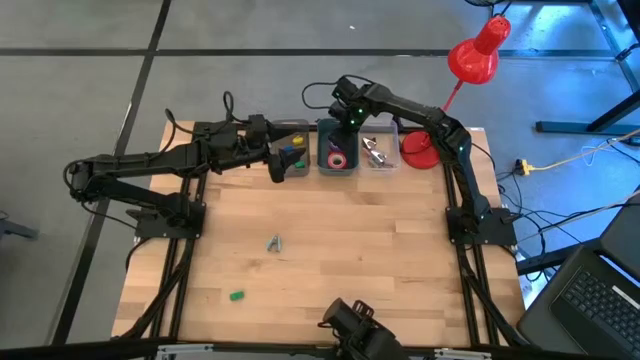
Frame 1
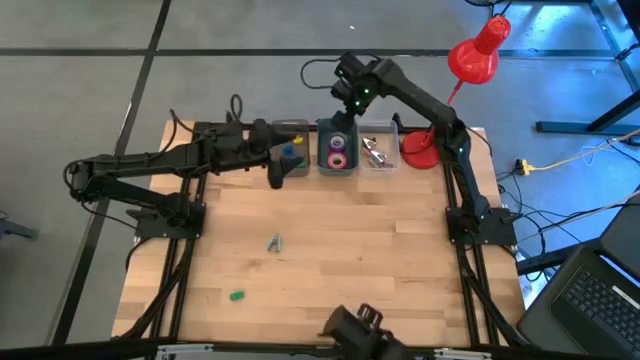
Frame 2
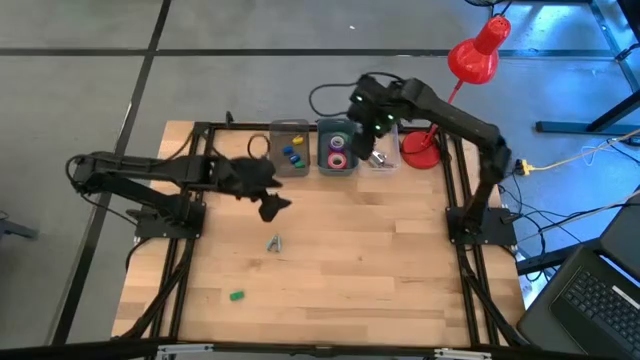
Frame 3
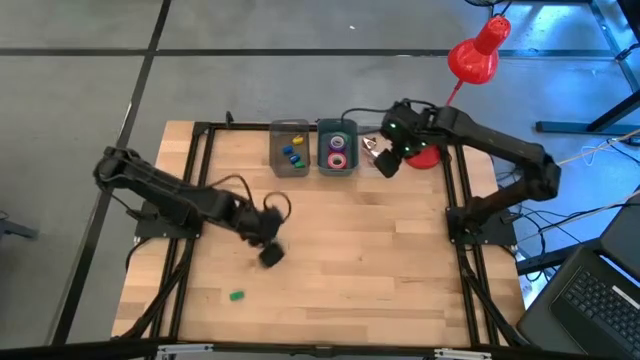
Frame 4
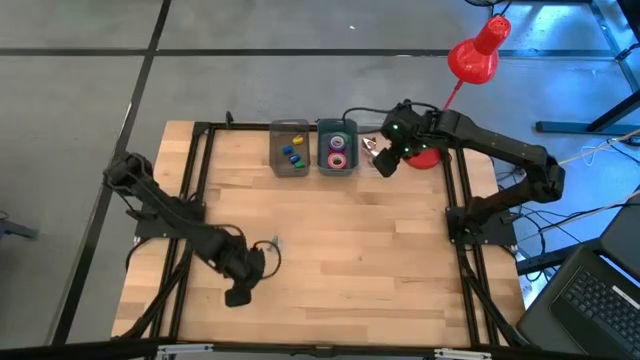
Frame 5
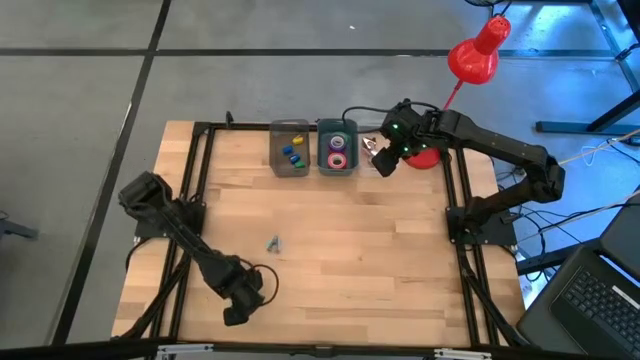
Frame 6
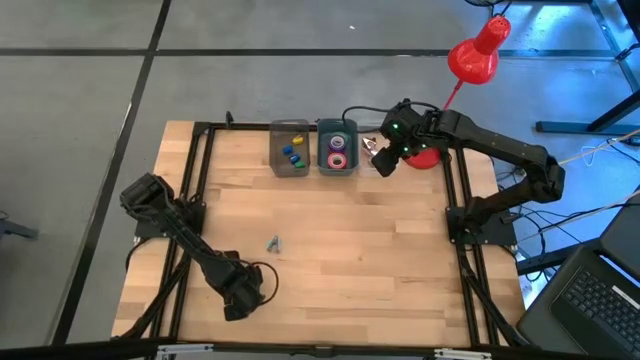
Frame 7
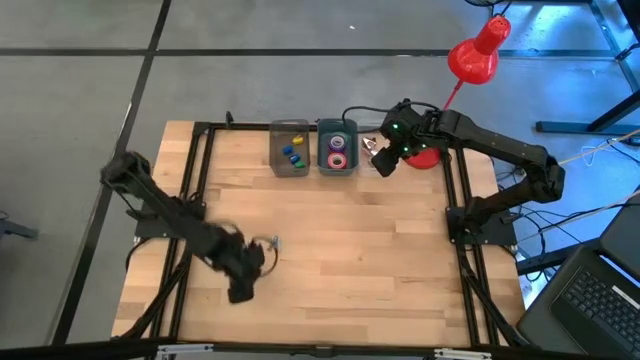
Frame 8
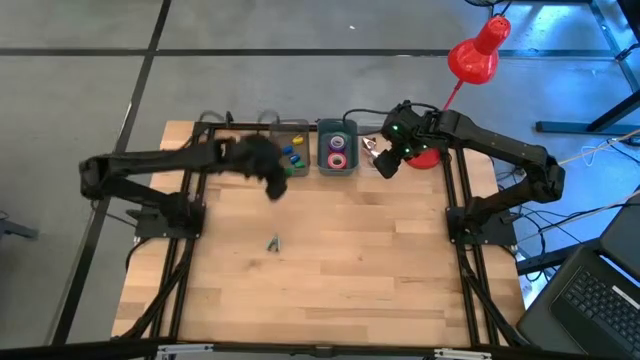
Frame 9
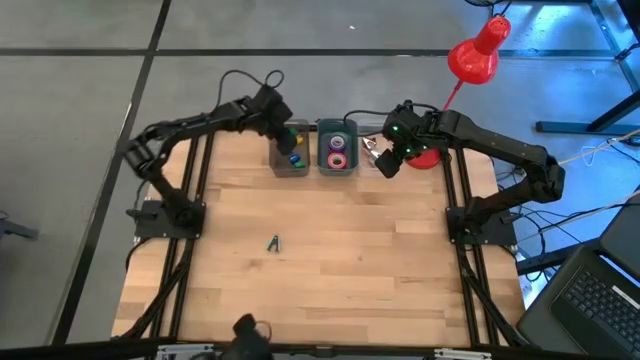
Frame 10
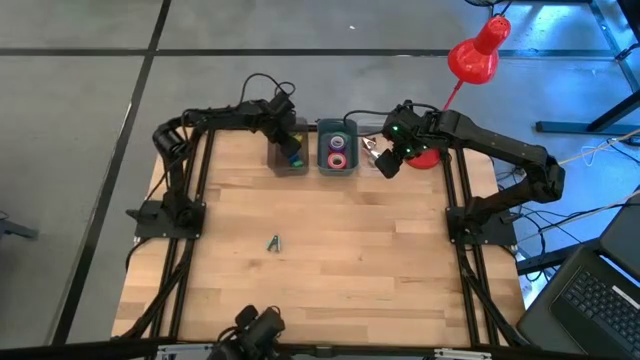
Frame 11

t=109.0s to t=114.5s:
Task: Pick and place Stapler, Stapler remover, tape
Put the green stapler into the black bin

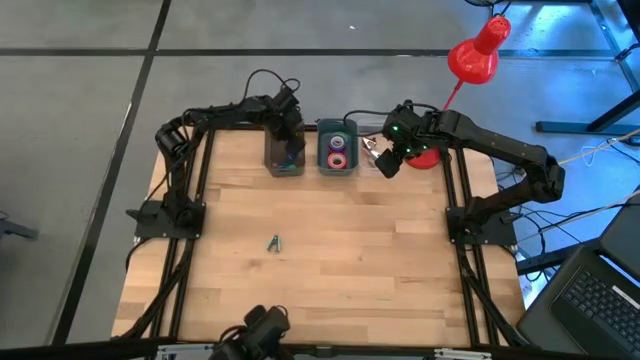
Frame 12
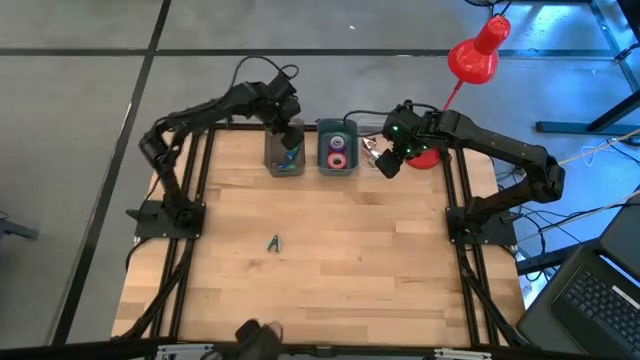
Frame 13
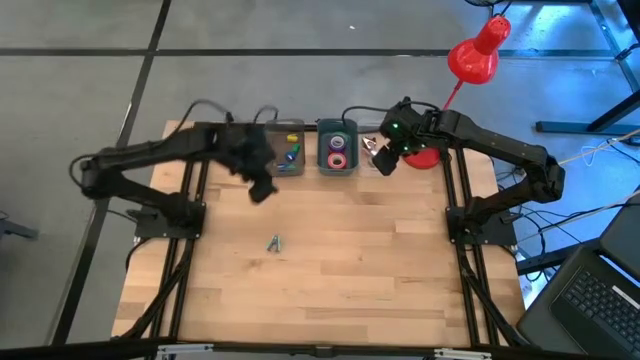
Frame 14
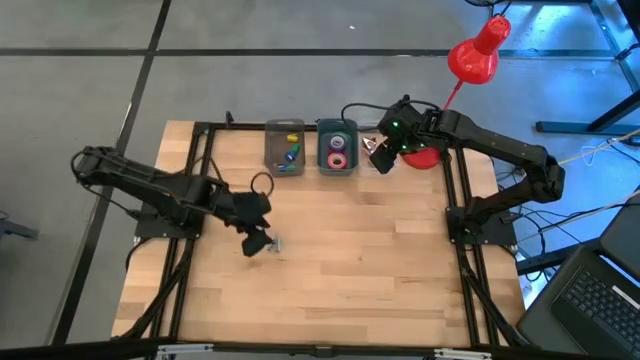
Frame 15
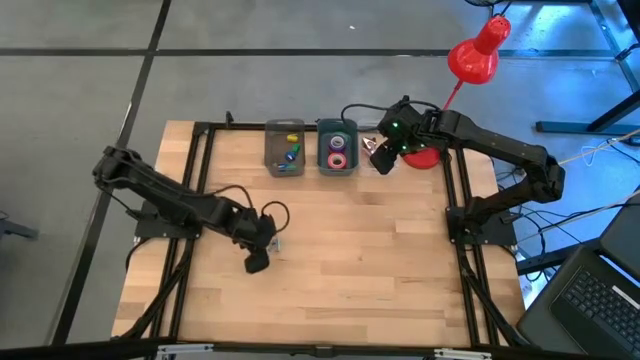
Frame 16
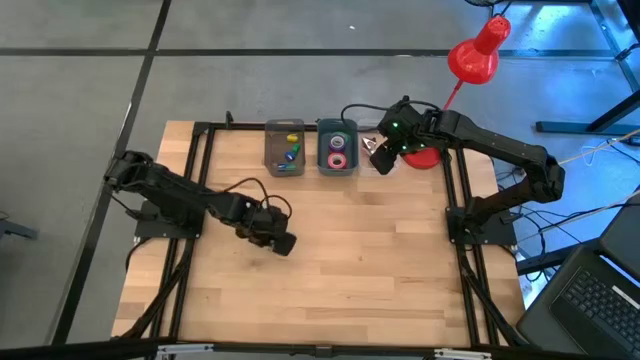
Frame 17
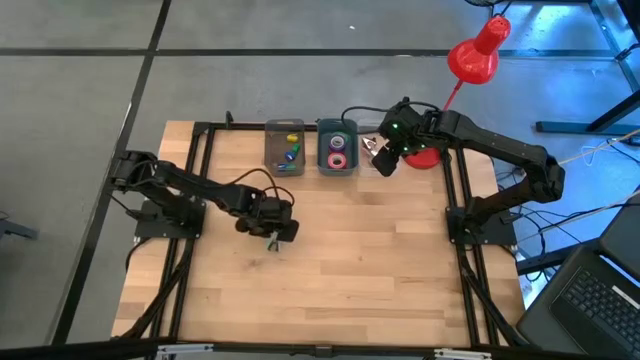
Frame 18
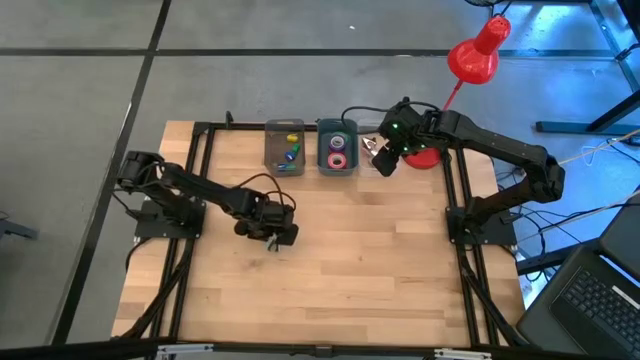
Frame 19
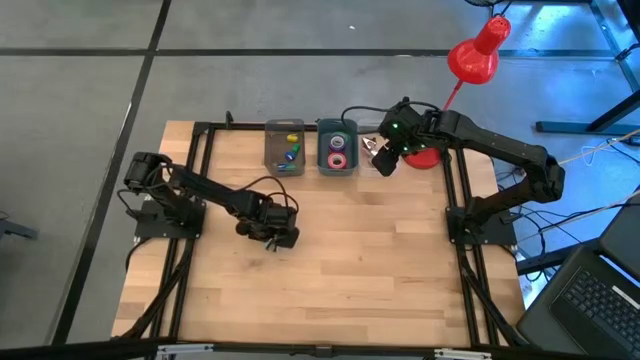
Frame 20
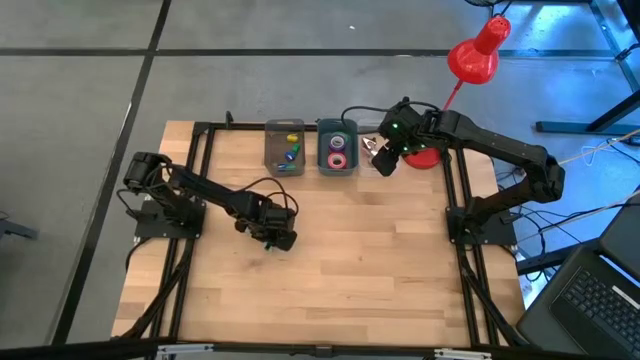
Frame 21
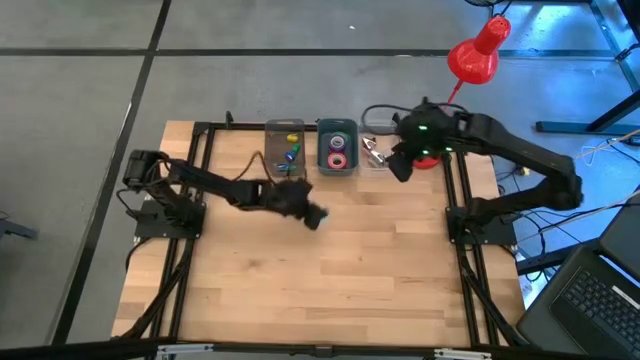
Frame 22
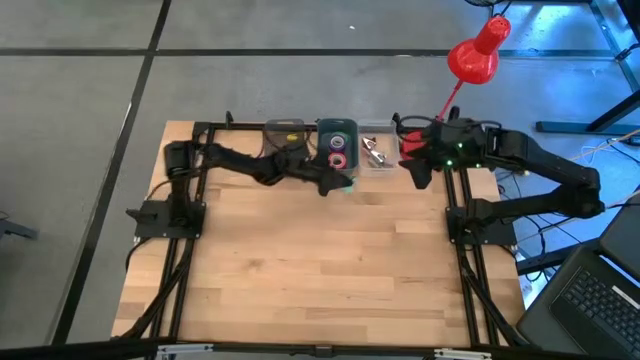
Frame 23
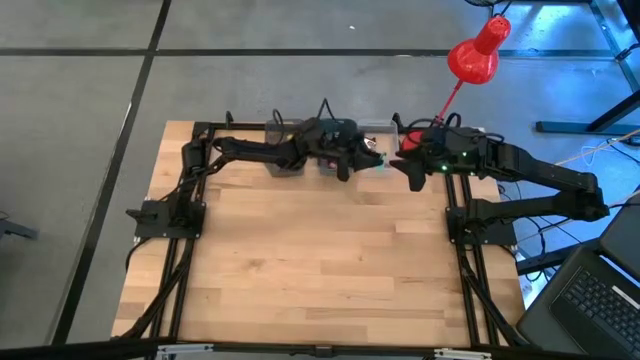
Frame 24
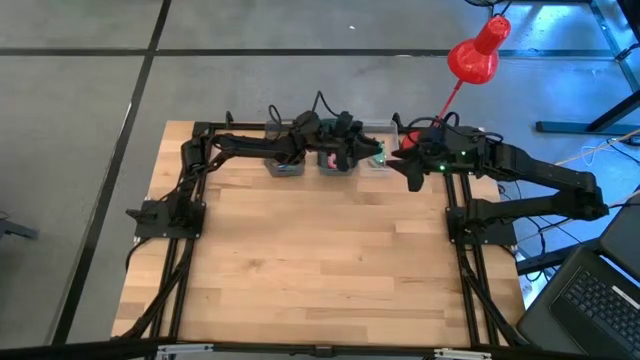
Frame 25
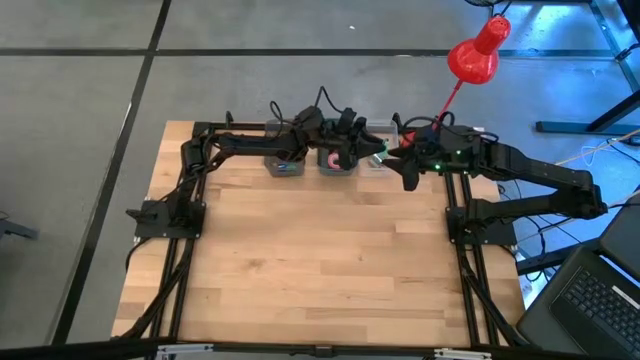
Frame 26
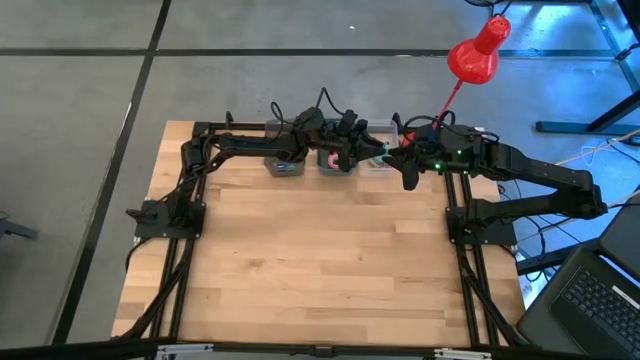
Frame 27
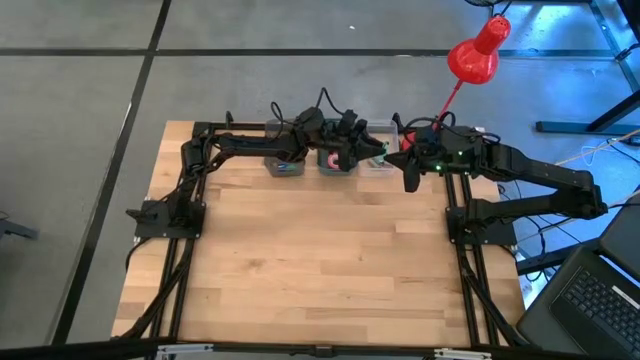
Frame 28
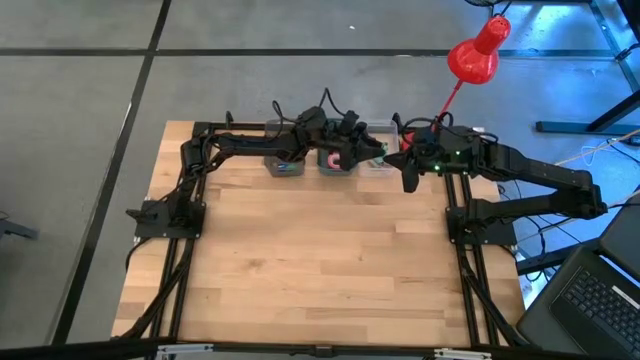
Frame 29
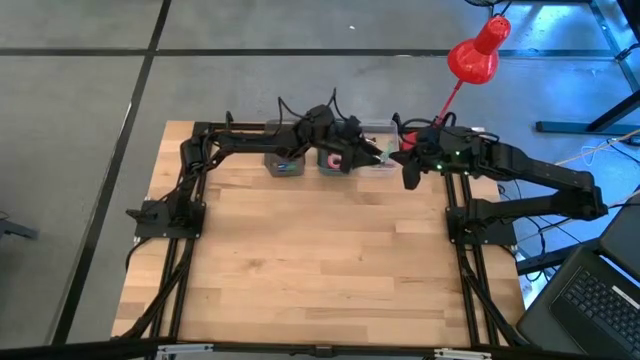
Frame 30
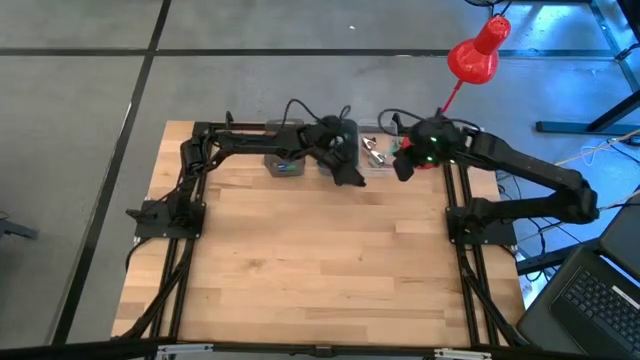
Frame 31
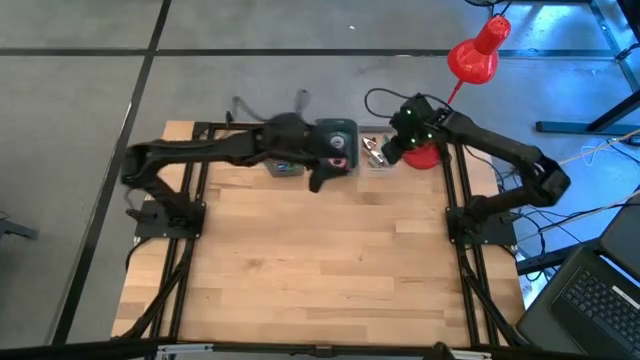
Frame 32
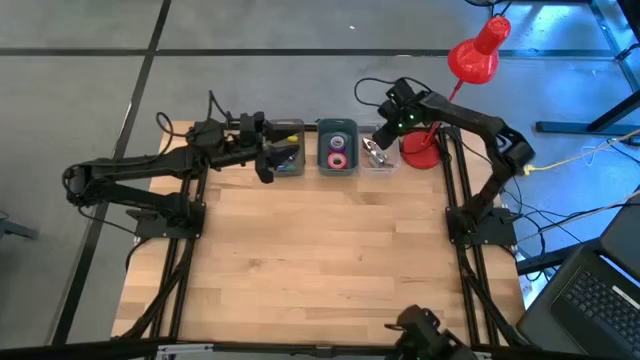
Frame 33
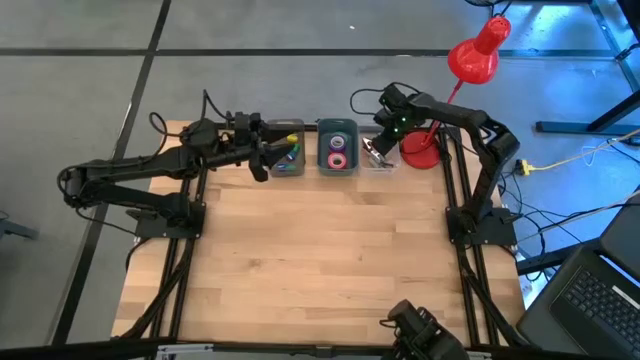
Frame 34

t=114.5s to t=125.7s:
Put the light blue staple remover into the transparent bin

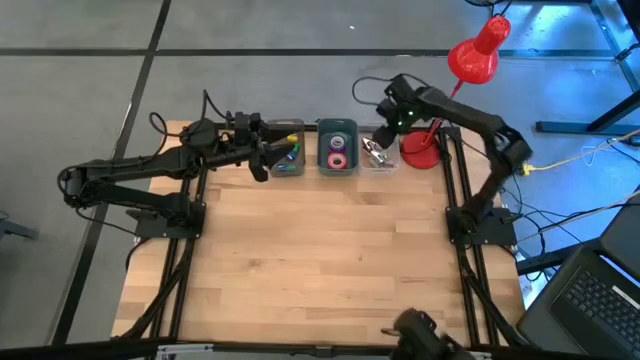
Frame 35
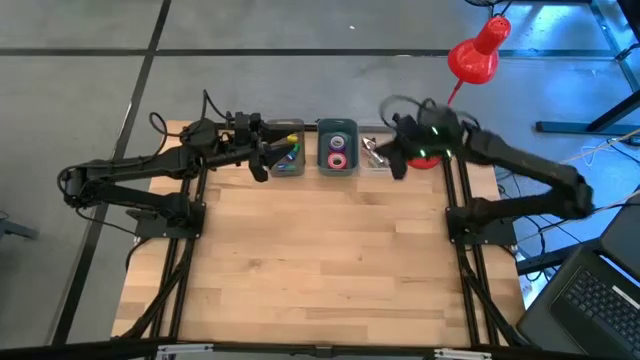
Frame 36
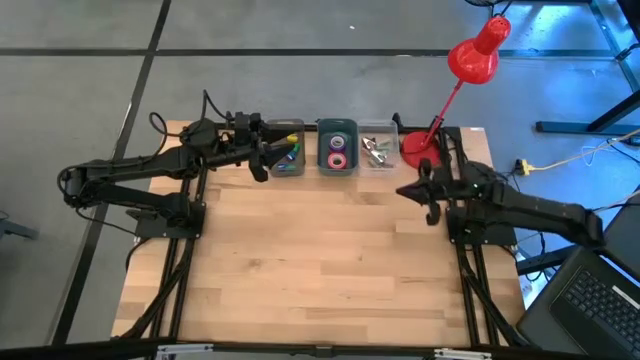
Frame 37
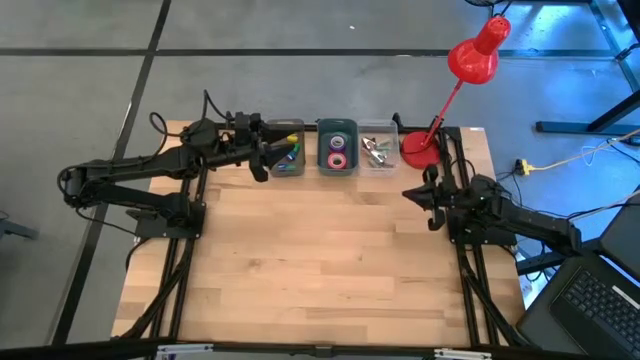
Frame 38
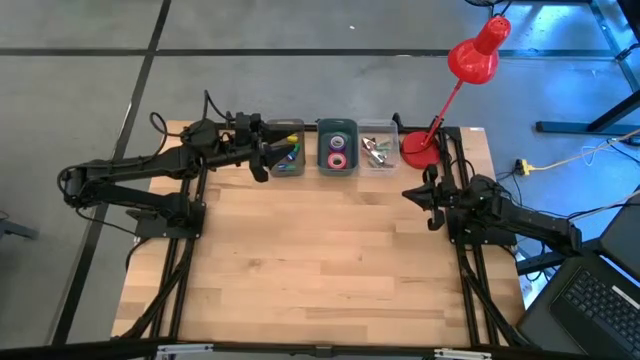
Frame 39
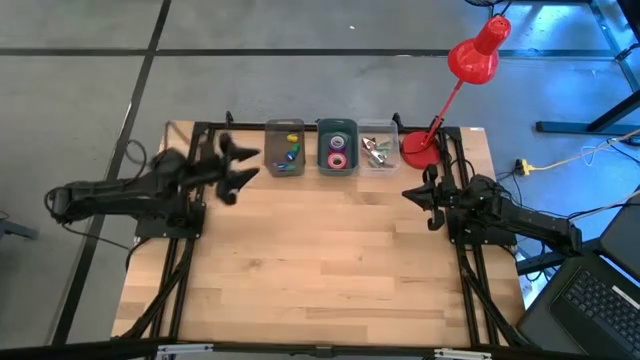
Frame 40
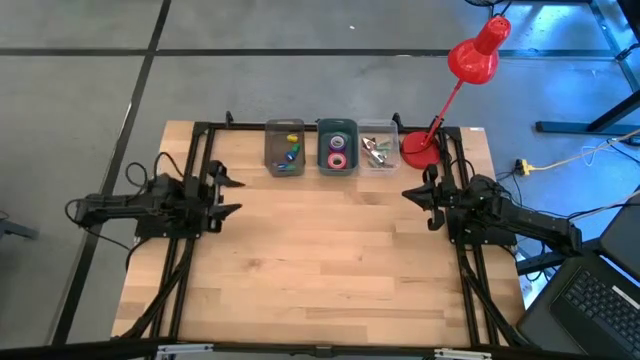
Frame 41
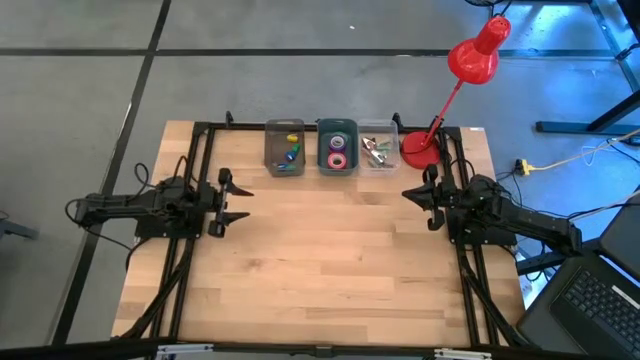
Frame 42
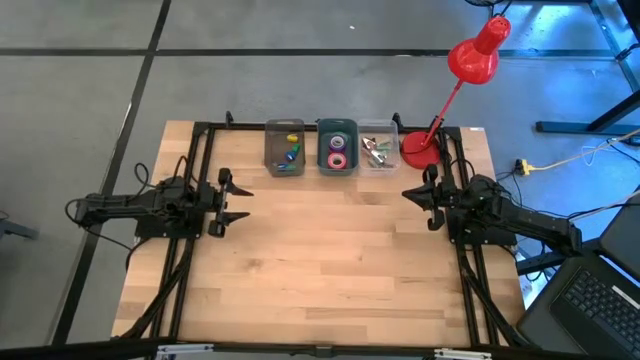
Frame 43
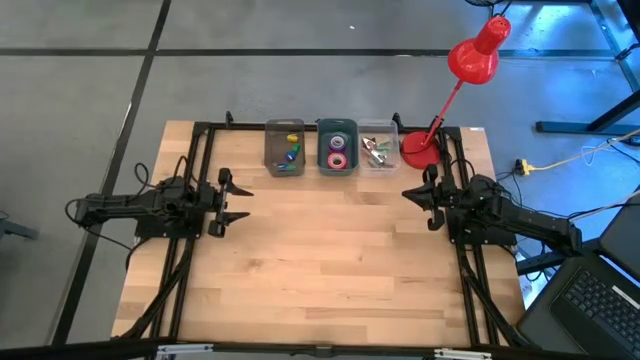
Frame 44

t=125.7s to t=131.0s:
Return to Home Position
